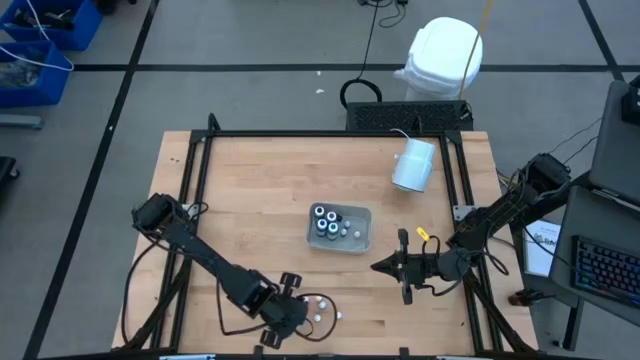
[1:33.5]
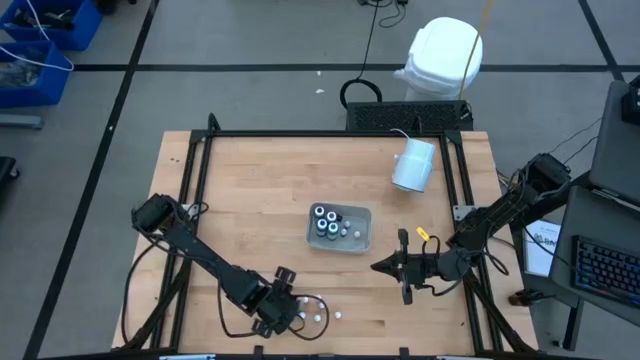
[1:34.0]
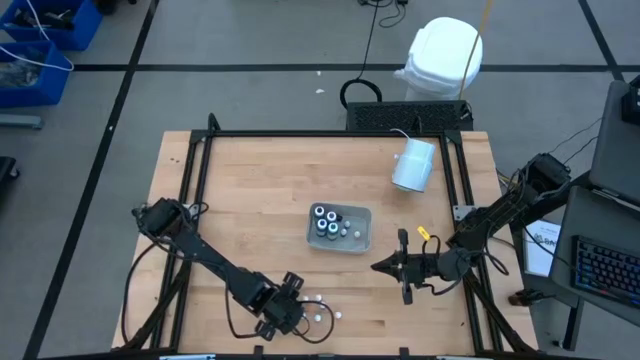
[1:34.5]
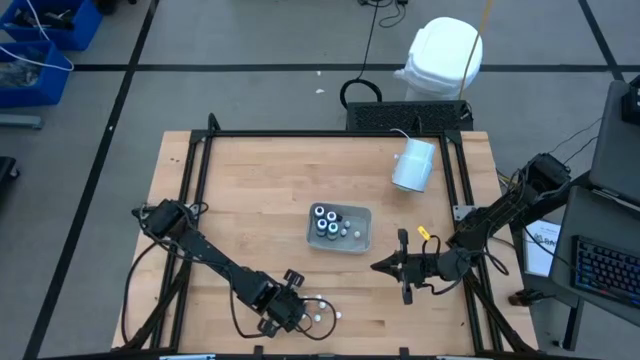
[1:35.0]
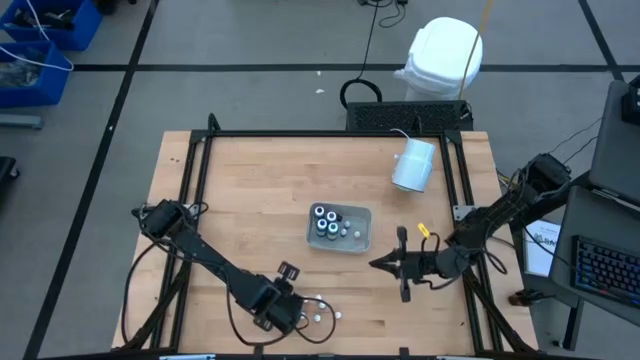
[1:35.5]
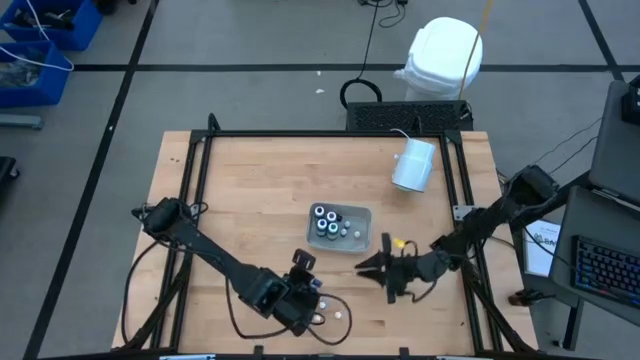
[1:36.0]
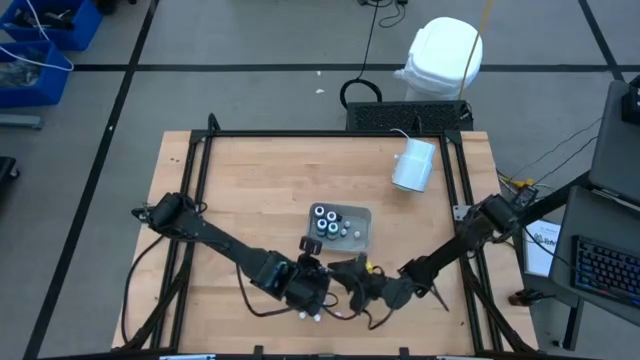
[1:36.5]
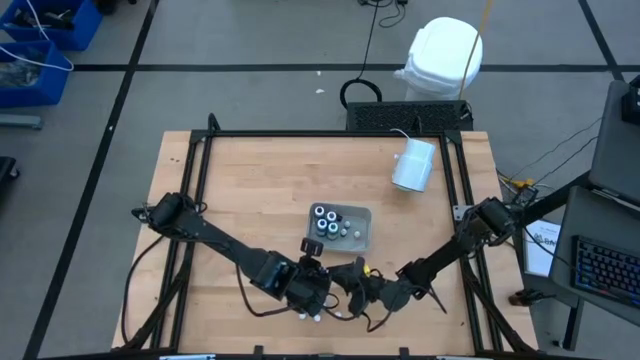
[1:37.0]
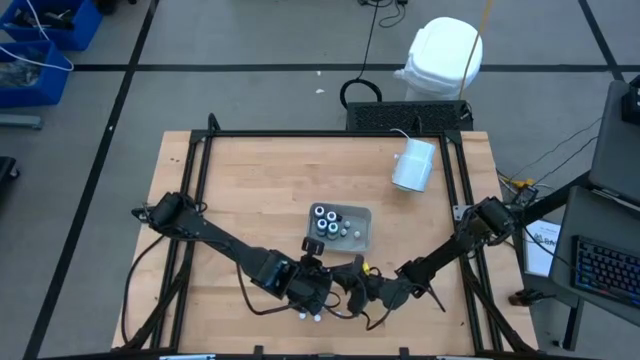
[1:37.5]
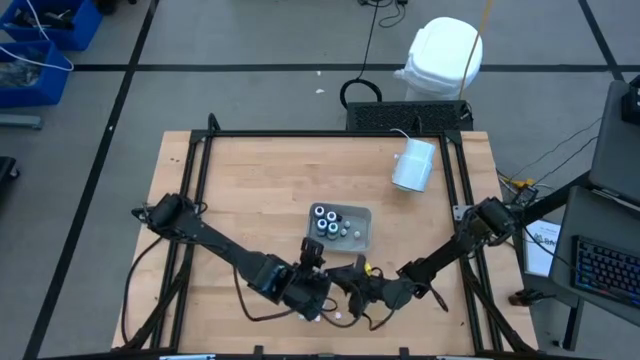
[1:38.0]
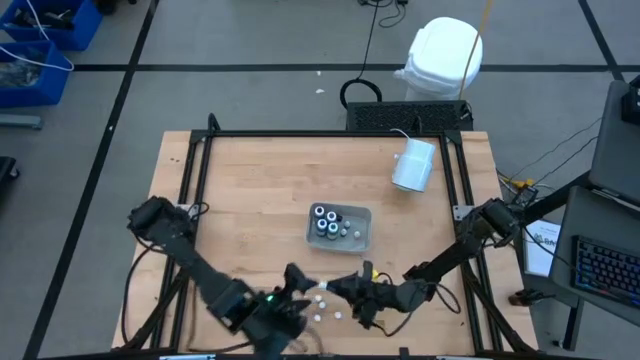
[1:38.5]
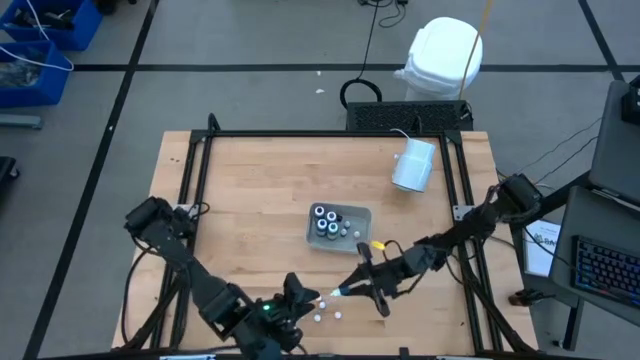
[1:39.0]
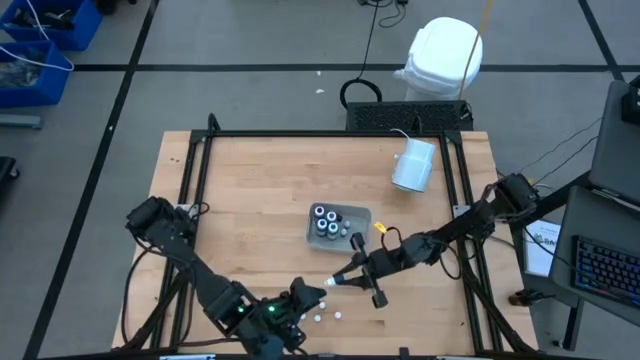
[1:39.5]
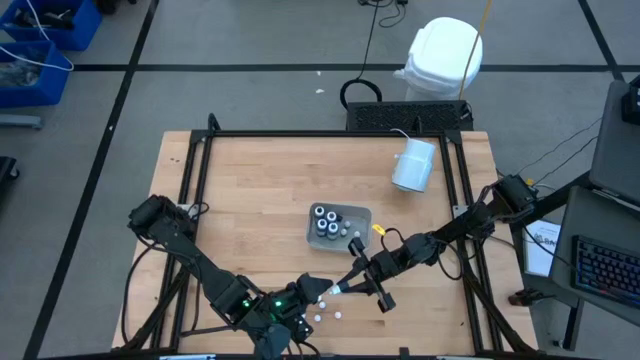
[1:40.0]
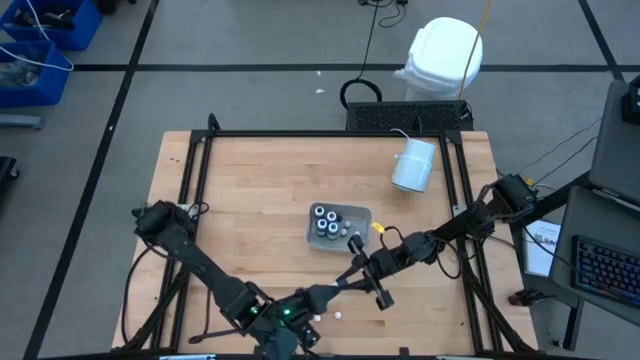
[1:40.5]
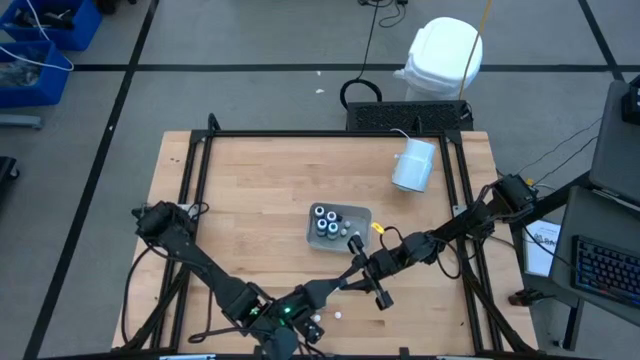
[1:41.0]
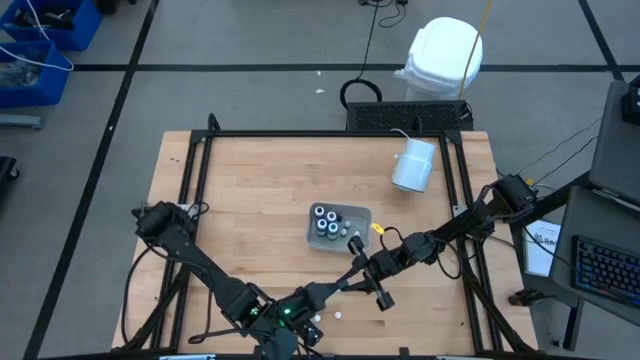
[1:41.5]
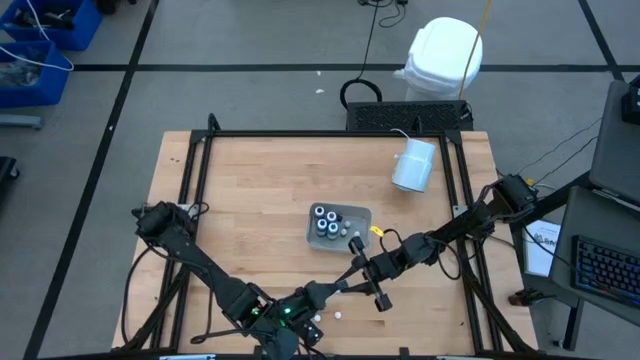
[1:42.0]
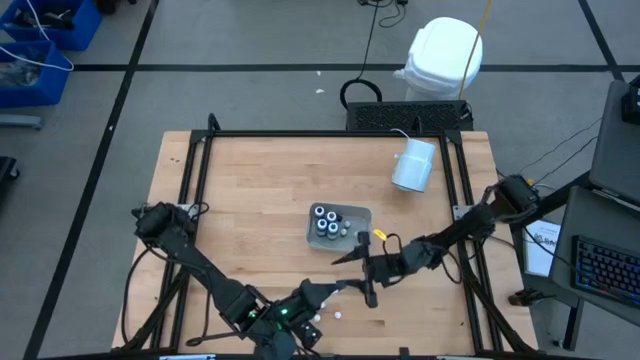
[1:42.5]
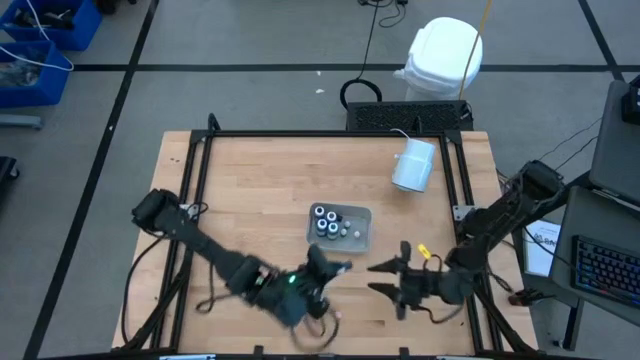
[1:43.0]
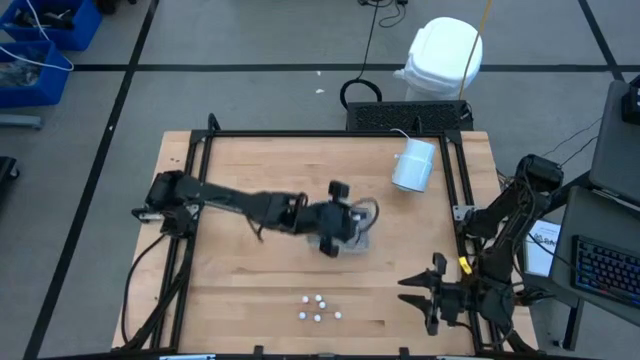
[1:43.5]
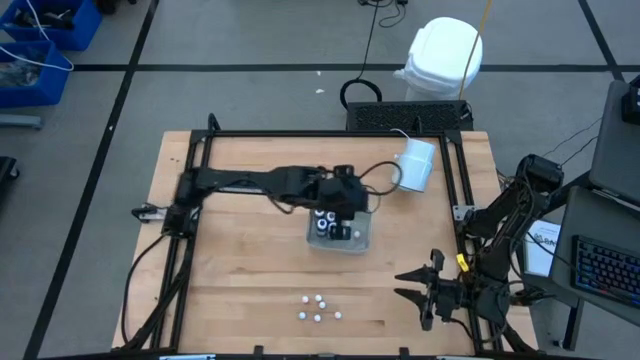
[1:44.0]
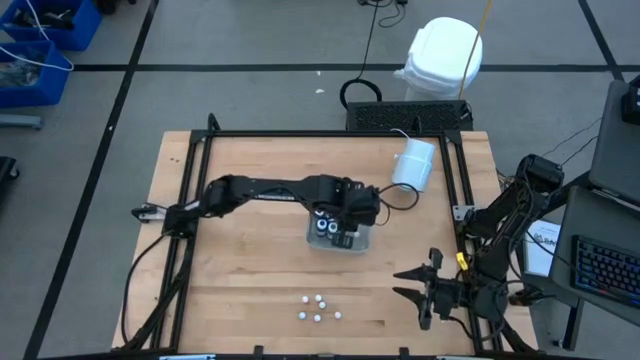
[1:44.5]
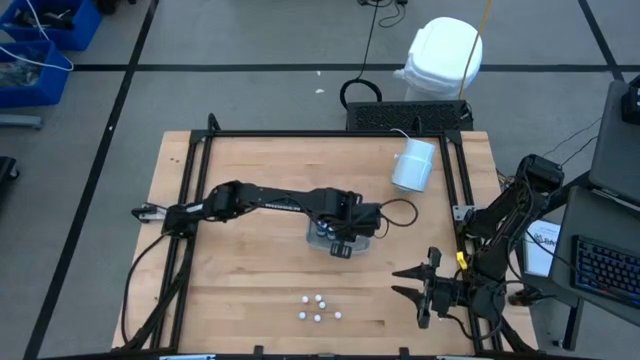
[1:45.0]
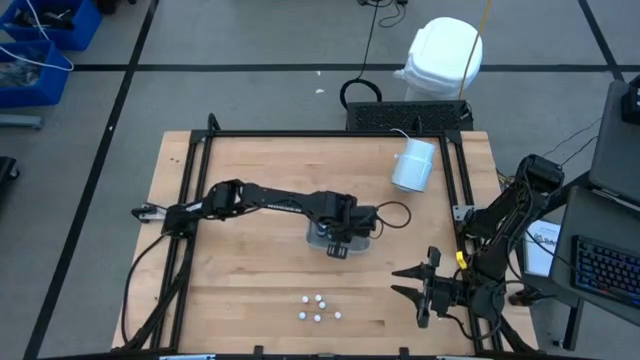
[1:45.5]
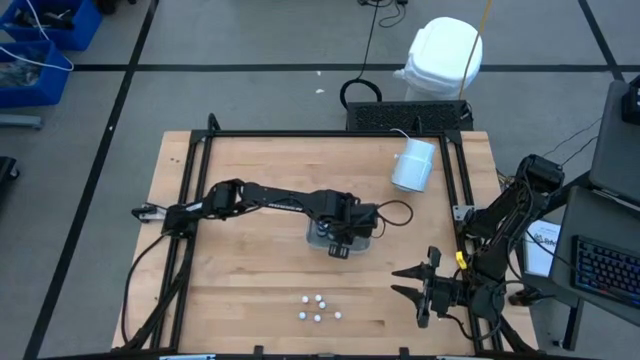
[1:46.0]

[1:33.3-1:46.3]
Task: Pick & Place food coloring
Put the small dark blue bottle into the gray bin

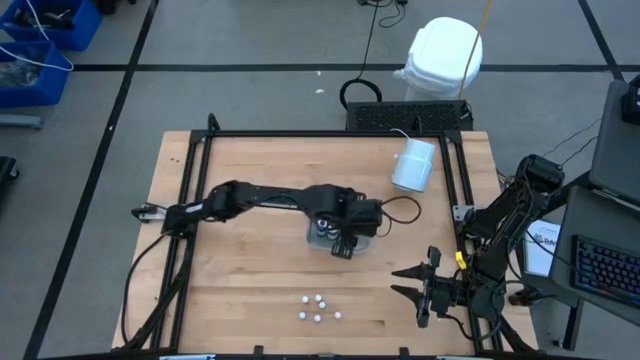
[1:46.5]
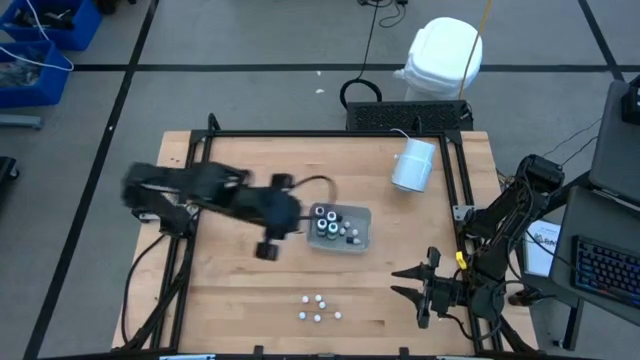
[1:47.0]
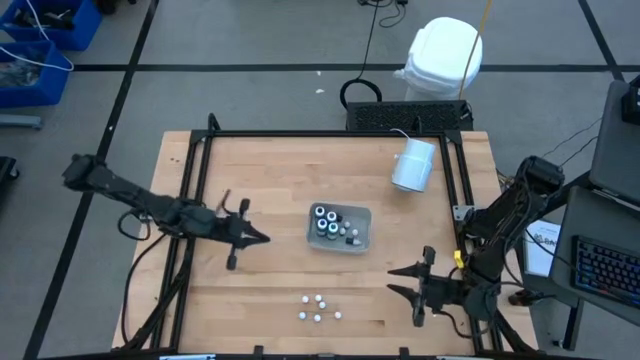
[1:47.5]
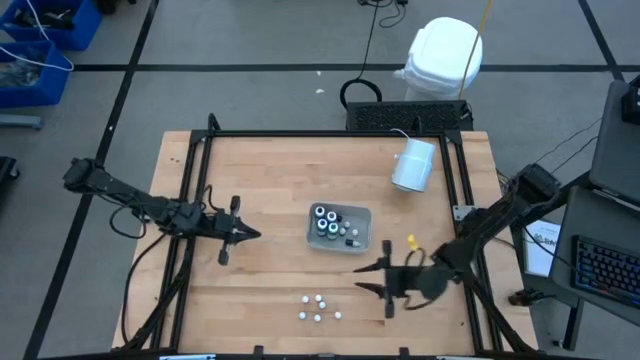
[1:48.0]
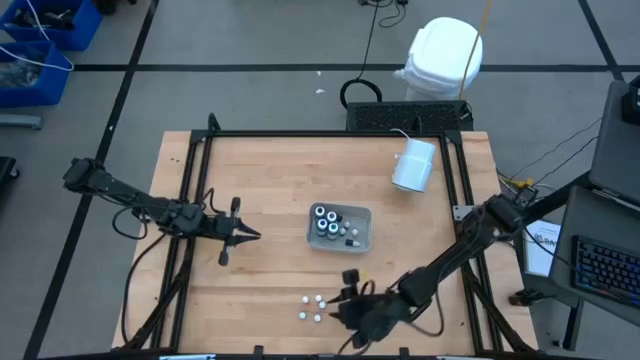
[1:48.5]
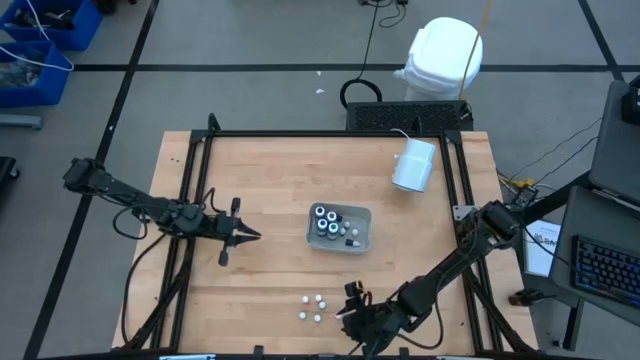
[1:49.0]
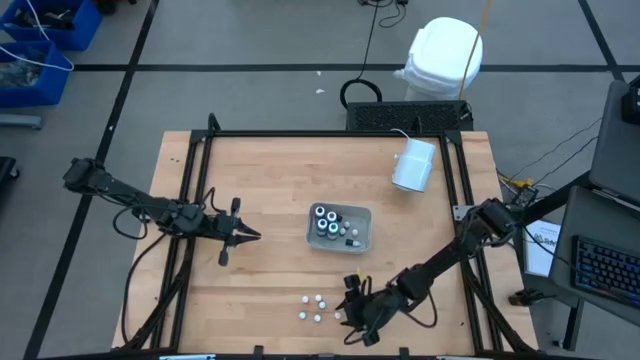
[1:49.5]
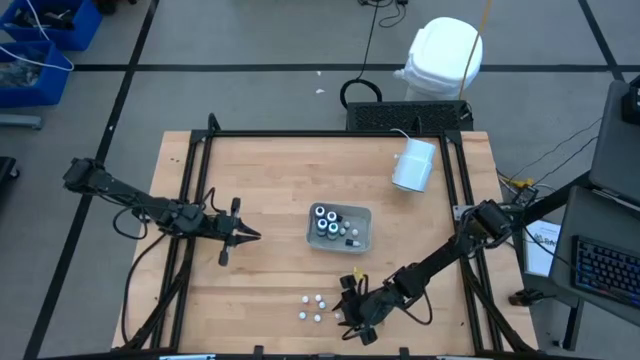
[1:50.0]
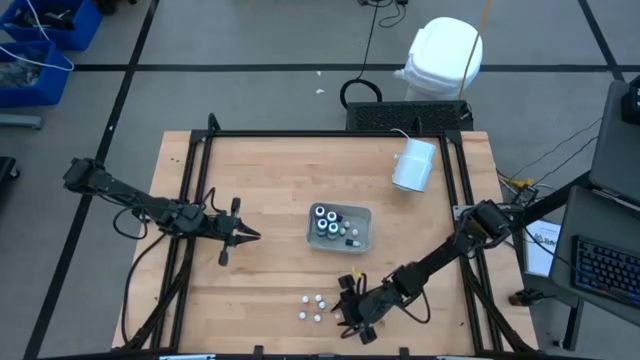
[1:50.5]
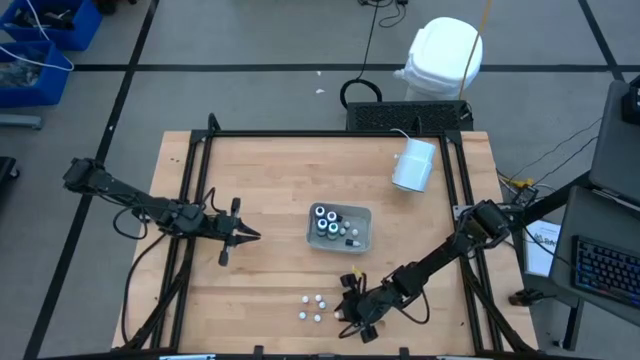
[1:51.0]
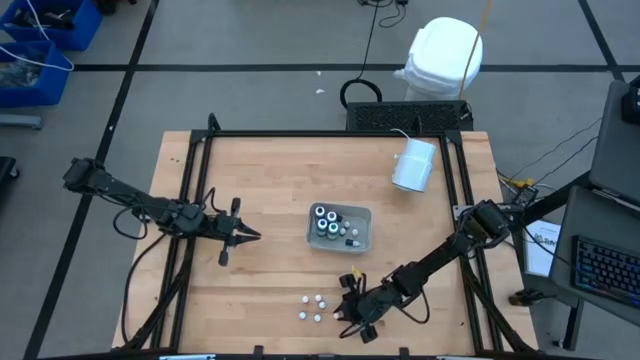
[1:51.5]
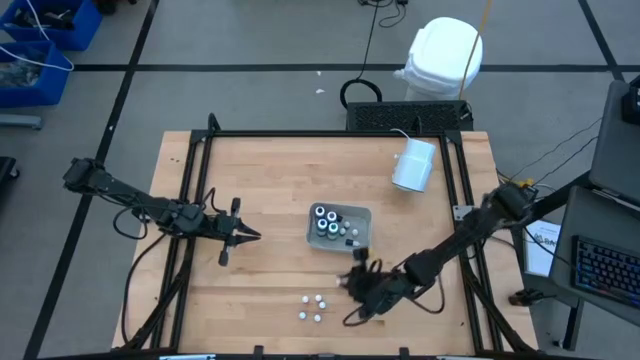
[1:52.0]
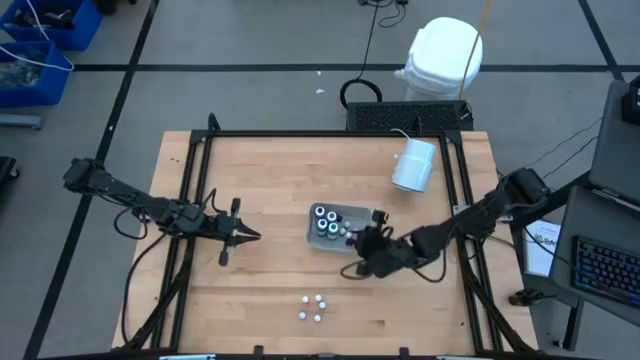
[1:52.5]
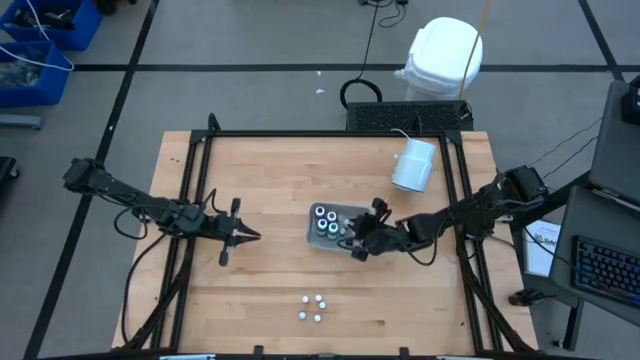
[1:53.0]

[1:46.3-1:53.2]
Put the small yellow bottle into the gray bin
